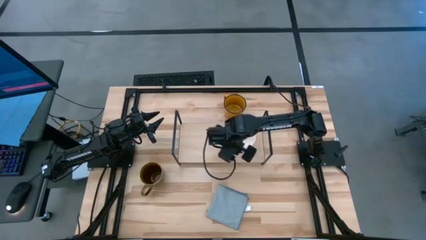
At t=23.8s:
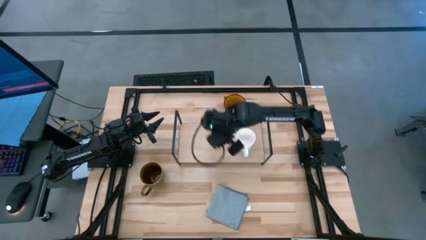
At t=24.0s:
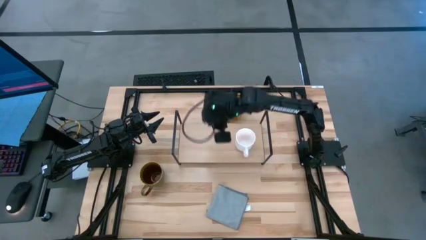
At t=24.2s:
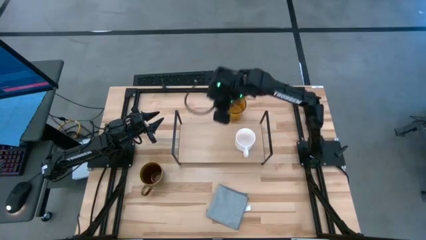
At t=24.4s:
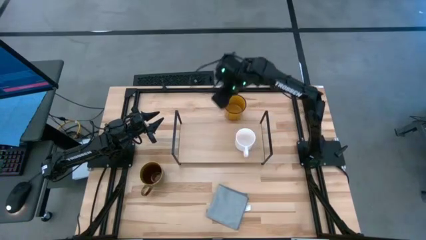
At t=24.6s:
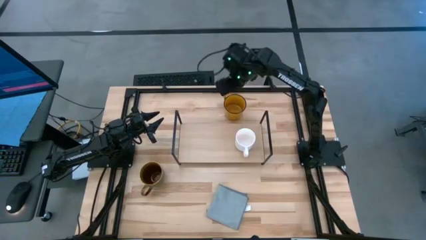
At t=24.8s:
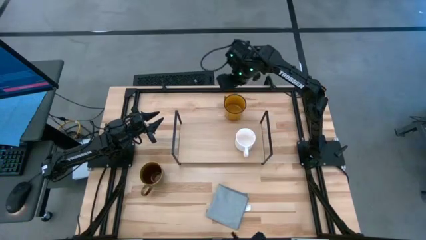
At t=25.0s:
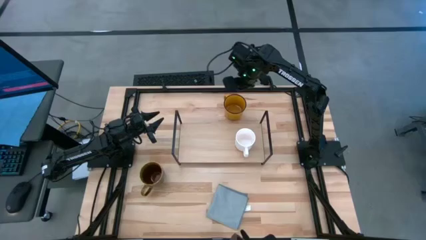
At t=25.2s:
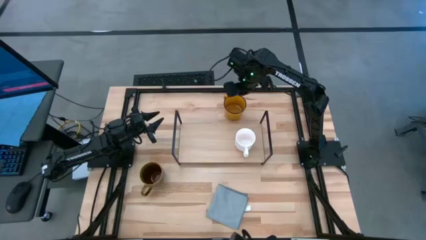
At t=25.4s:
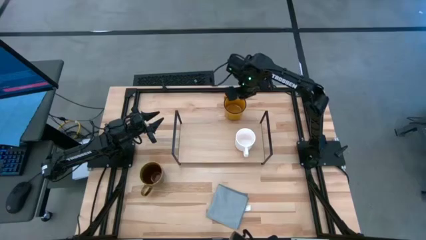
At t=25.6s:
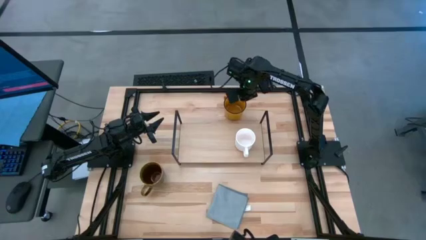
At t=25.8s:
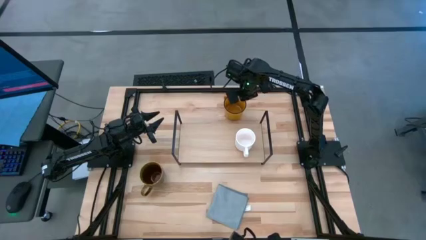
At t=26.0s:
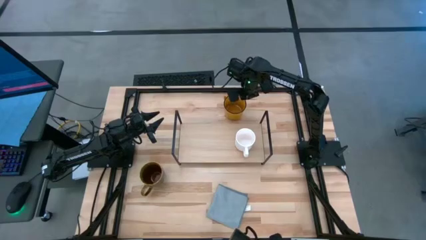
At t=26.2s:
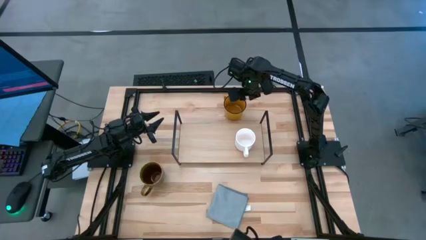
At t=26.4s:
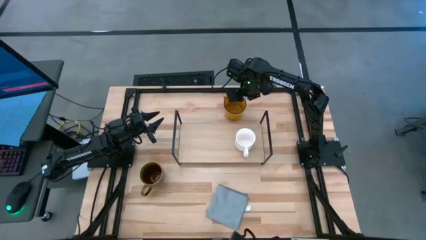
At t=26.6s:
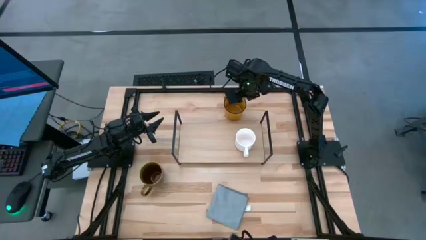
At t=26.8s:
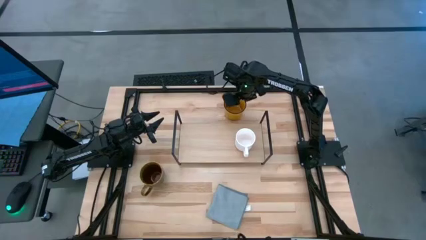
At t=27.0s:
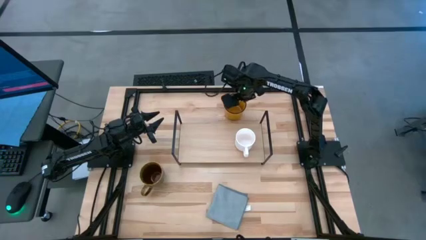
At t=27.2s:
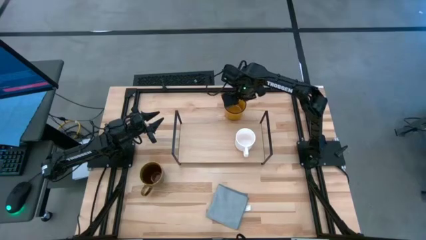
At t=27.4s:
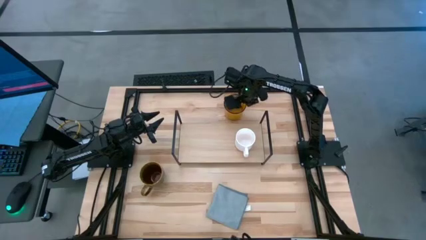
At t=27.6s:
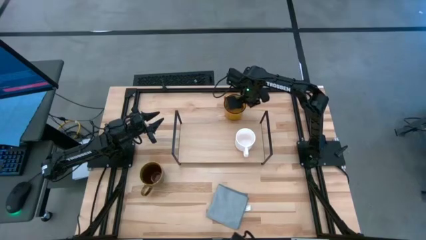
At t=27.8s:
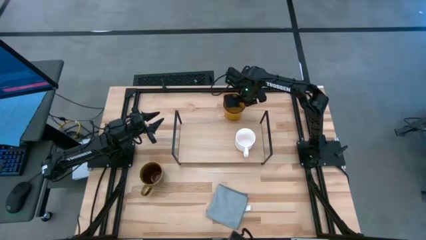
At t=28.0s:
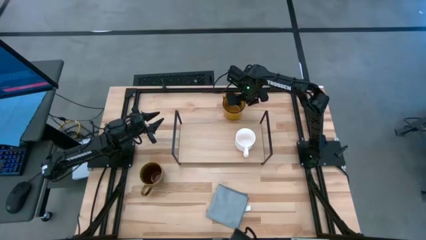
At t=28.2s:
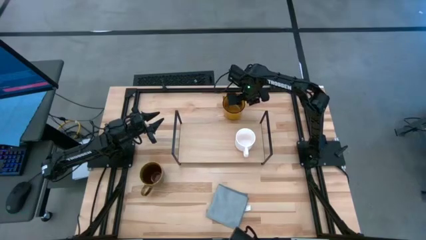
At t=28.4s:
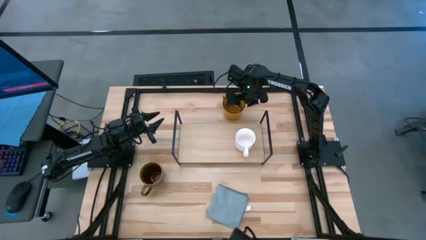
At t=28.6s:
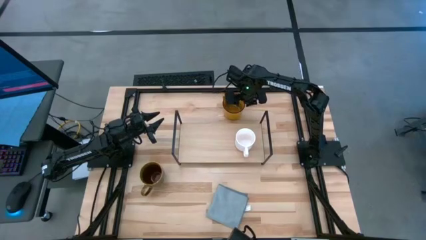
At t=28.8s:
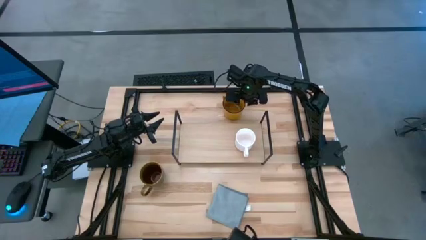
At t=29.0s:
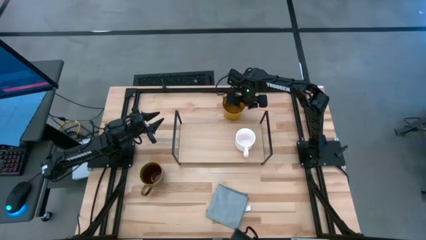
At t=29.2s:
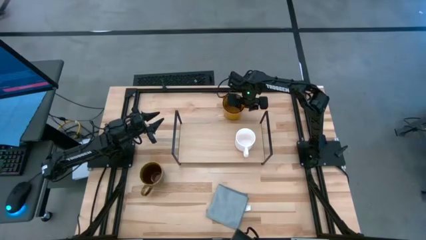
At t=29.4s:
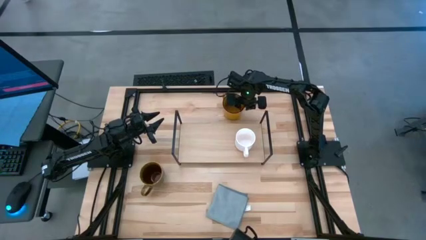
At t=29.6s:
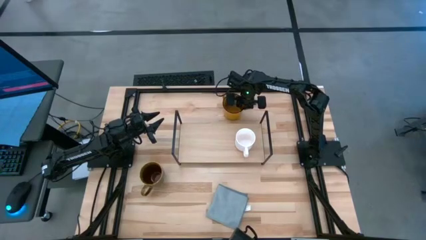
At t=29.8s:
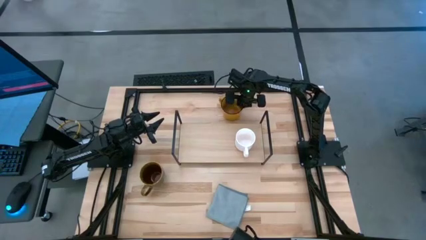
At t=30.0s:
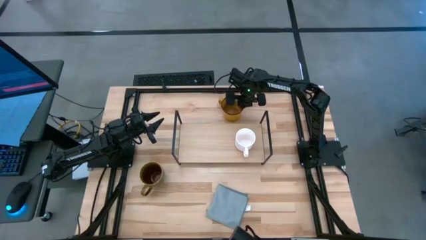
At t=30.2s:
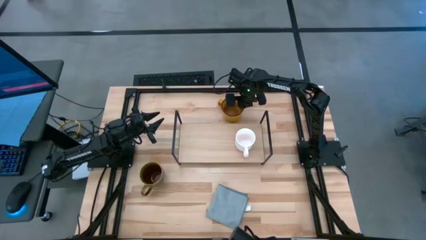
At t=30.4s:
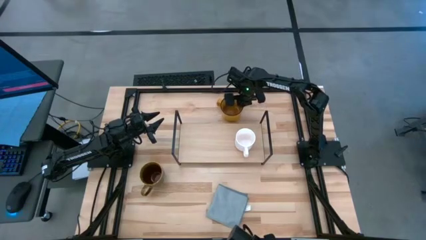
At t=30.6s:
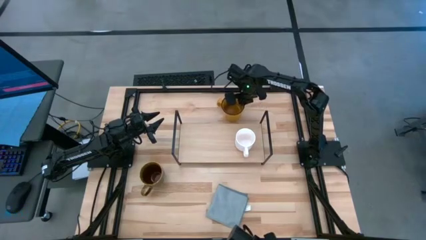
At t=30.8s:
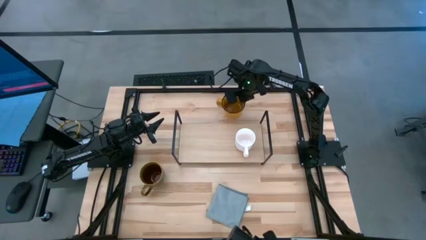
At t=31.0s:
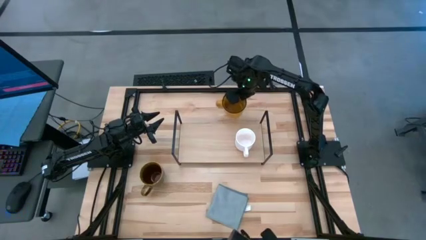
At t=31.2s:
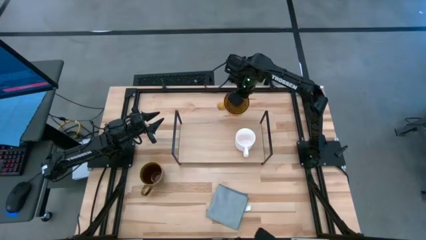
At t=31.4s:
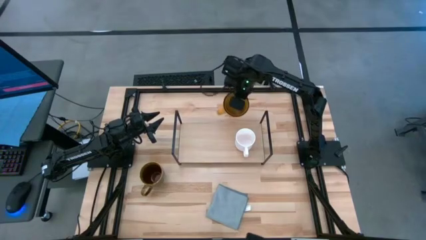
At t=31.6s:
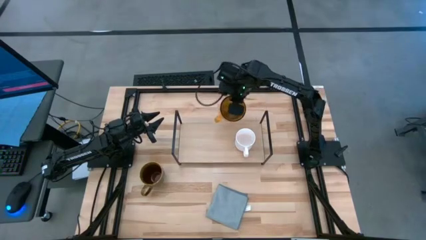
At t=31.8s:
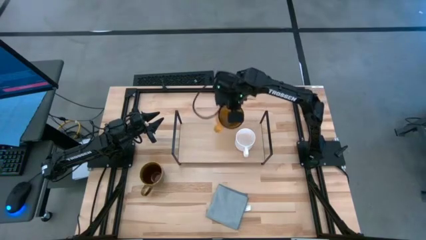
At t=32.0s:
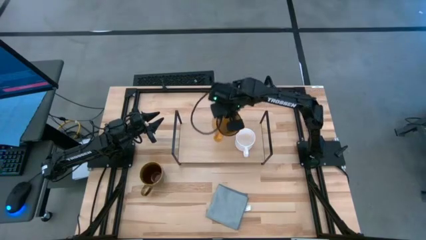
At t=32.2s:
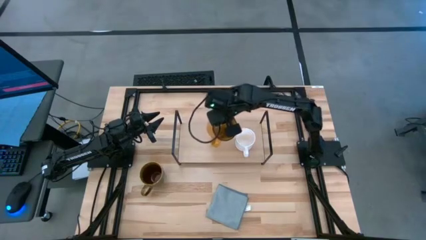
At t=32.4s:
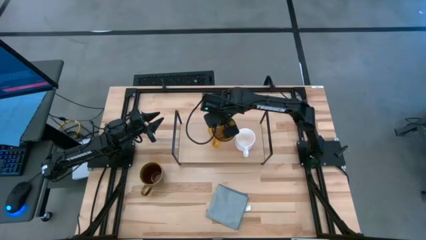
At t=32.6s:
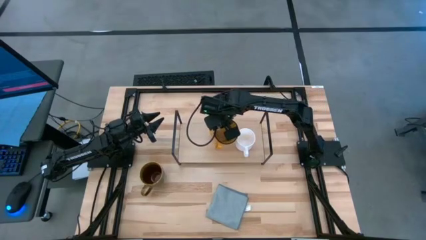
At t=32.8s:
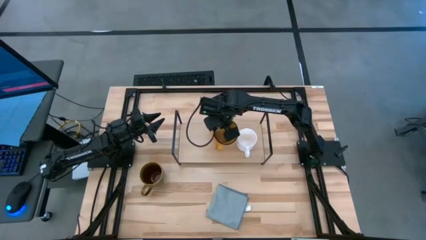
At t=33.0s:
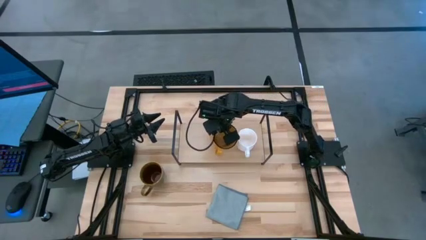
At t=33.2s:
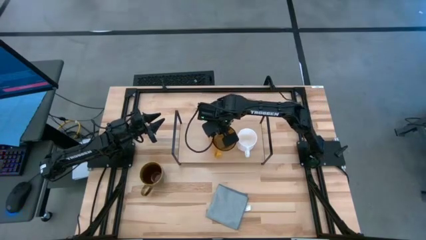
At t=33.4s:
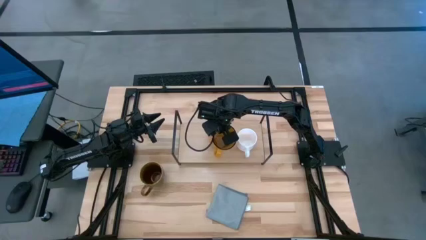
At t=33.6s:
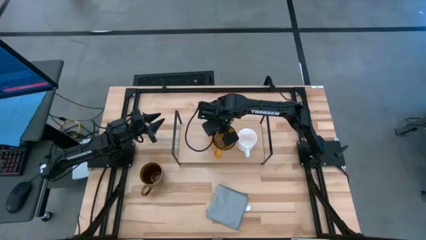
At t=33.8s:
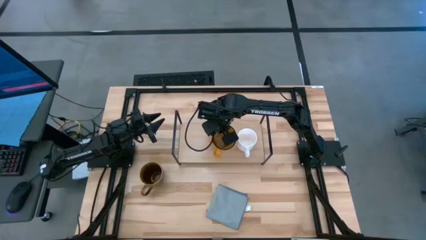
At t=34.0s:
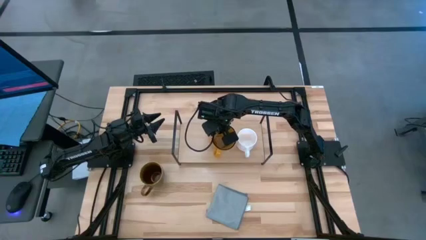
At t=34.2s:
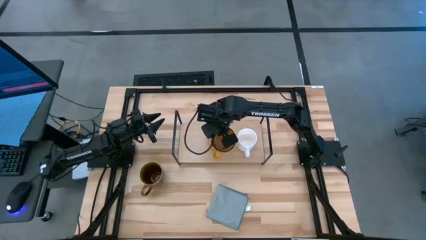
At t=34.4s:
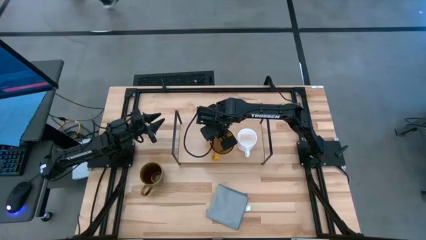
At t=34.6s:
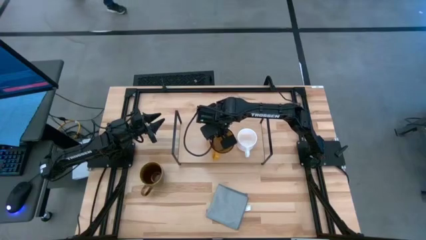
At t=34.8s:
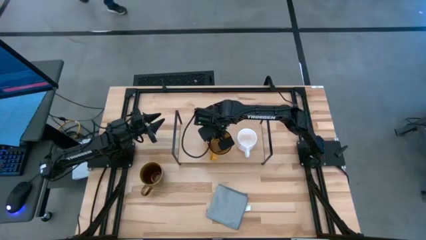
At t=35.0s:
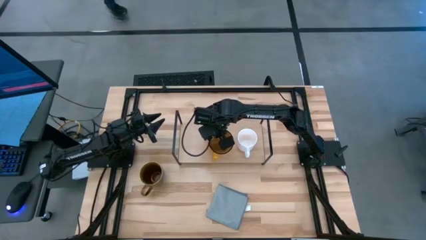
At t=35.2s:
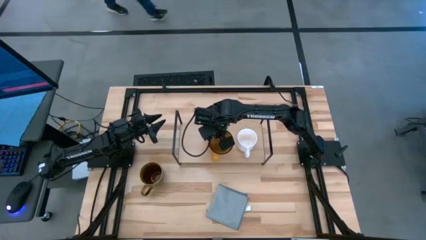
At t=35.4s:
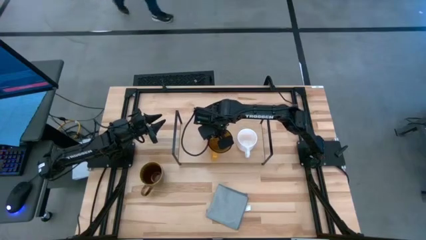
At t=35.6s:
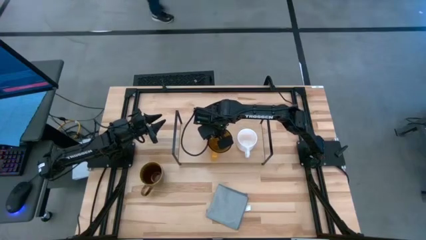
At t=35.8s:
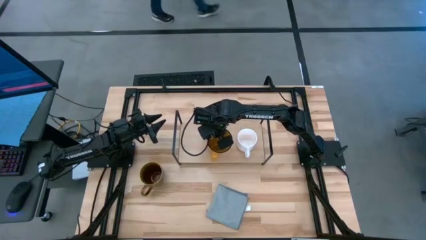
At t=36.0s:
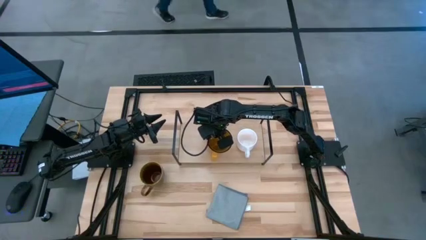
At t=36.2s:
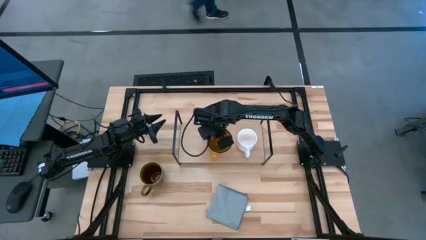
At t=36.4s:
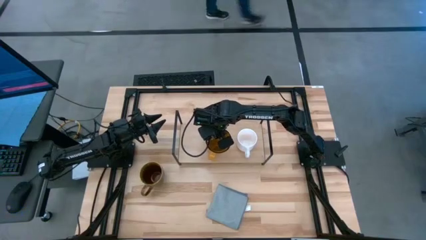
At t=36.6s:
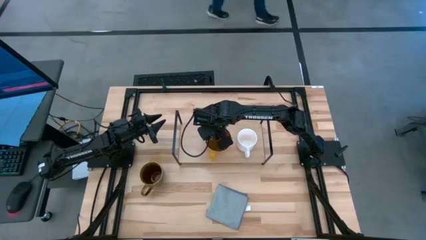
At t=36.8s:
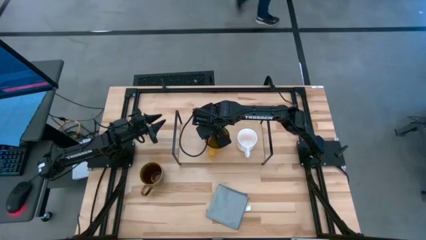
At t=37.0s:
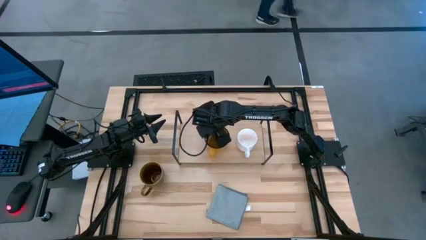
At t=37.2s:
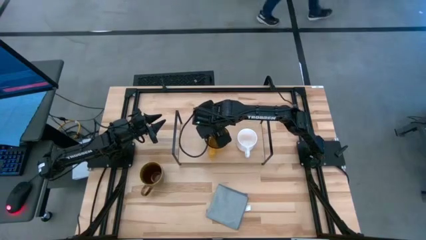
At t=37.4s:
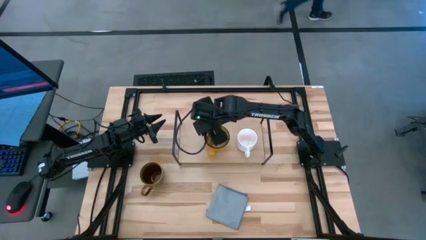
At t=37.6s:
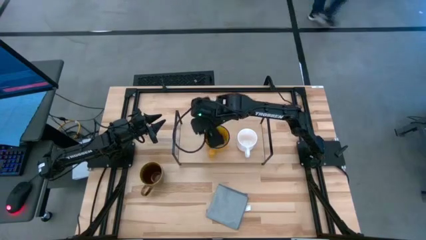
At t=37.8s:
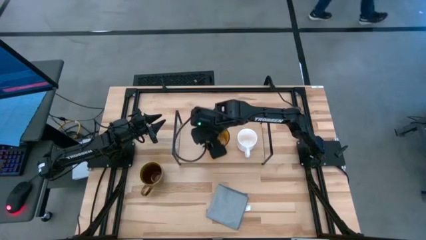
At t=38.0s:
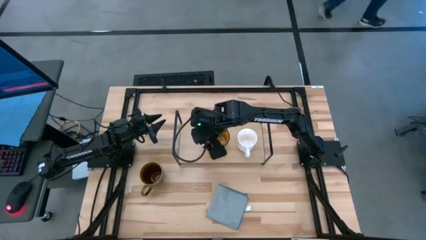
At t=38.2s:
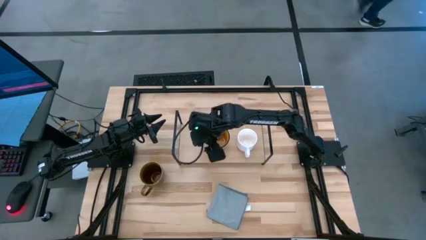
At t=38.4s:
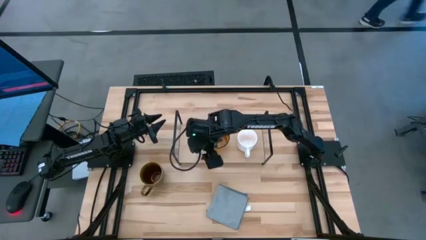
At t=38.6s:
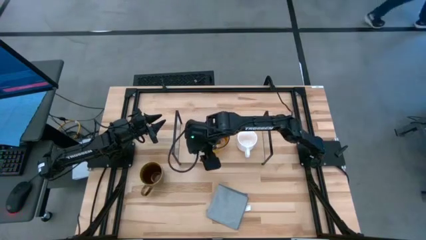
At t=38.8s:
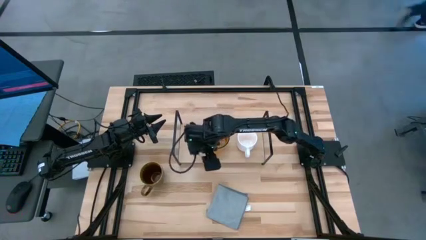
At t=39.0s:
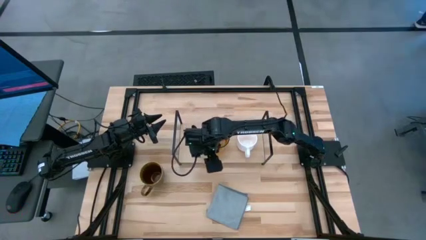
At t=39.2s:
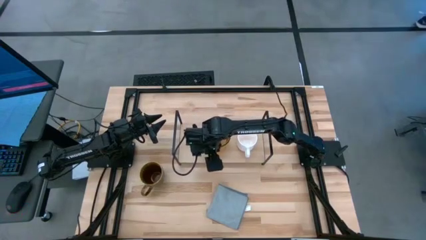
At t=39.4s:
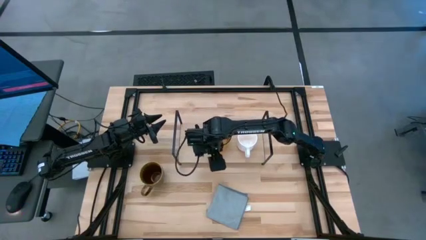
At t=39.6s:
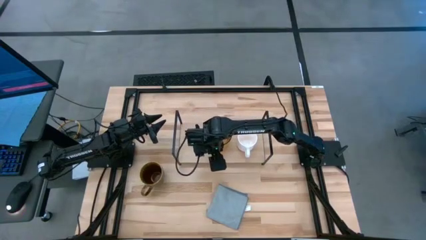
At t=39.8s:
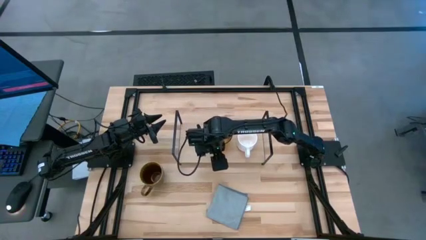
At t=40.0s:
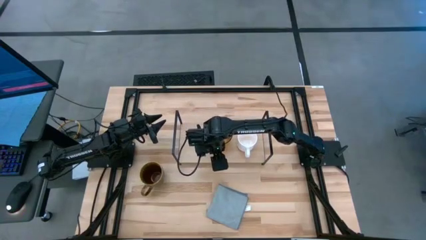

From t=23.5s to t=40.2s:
Task: Stack small to large cups/mugs on shelf
Put the yellow cup on the shelf
